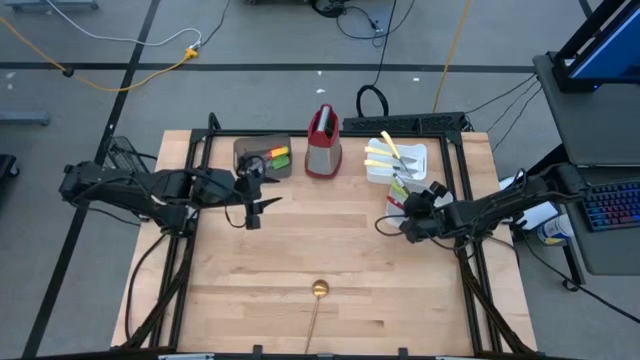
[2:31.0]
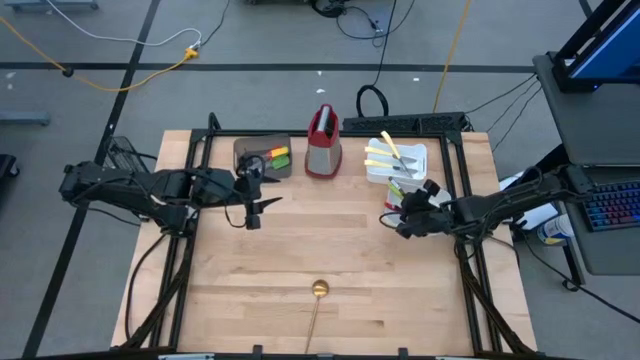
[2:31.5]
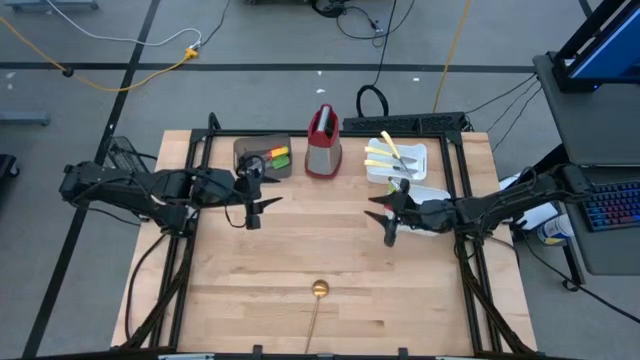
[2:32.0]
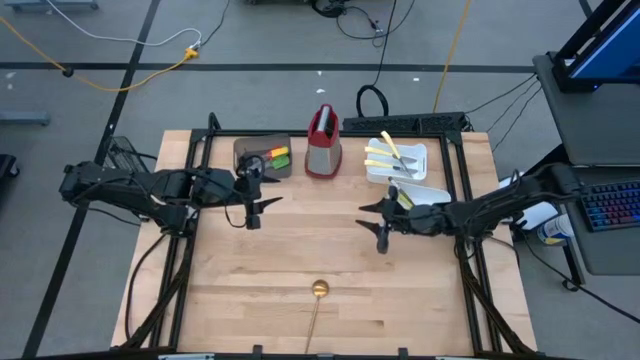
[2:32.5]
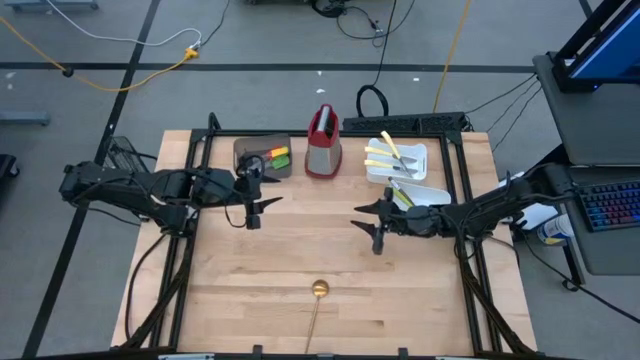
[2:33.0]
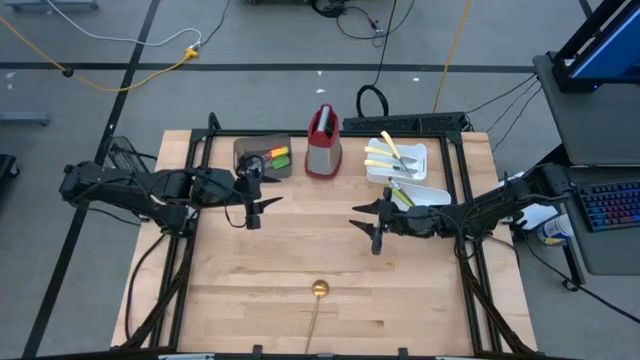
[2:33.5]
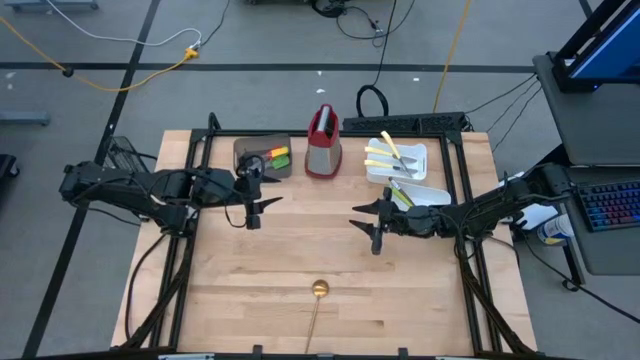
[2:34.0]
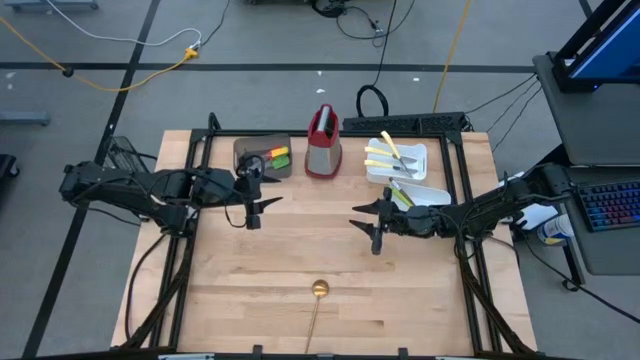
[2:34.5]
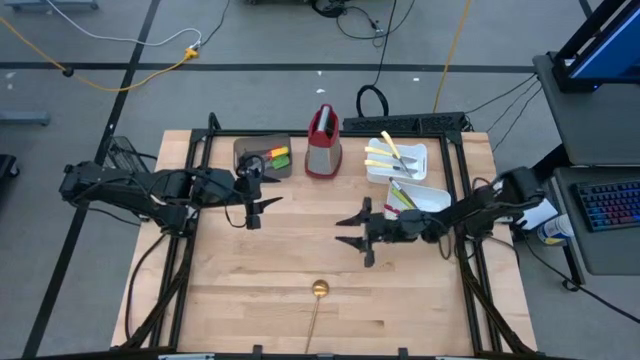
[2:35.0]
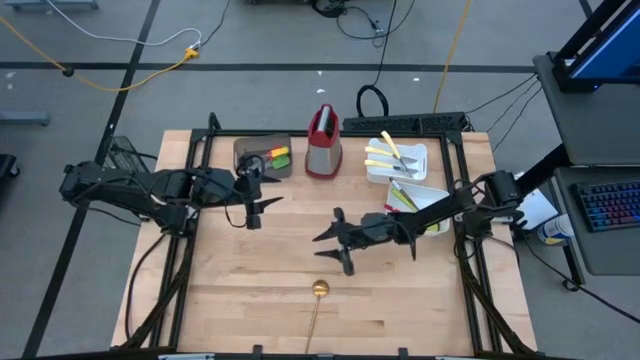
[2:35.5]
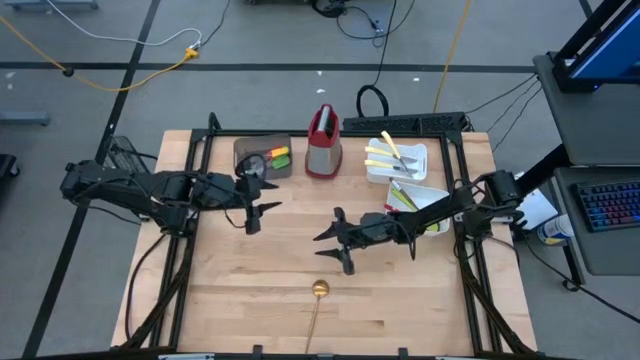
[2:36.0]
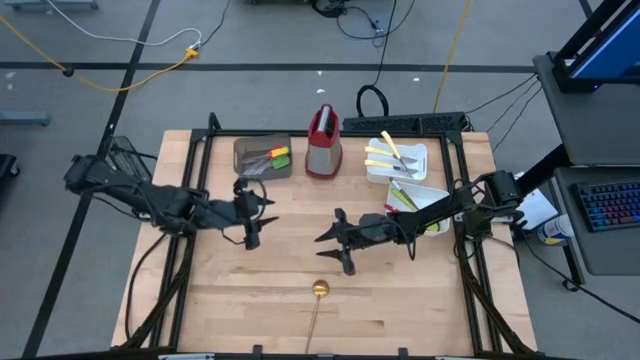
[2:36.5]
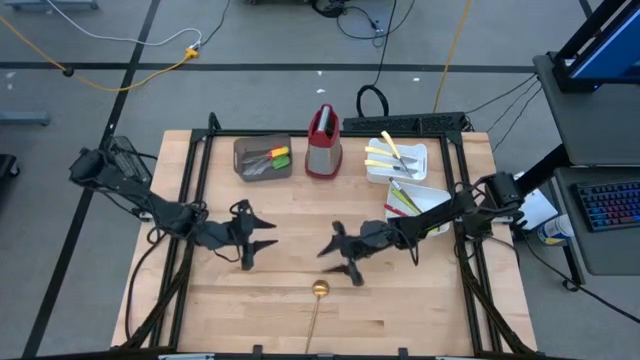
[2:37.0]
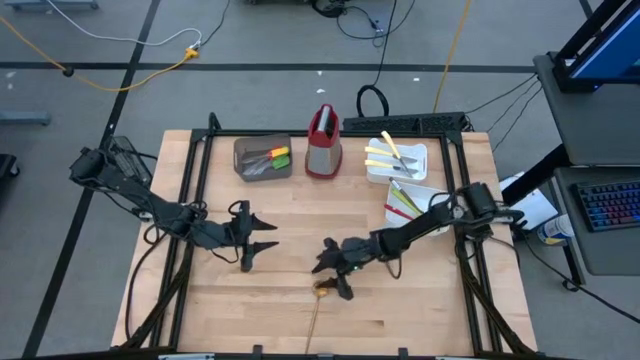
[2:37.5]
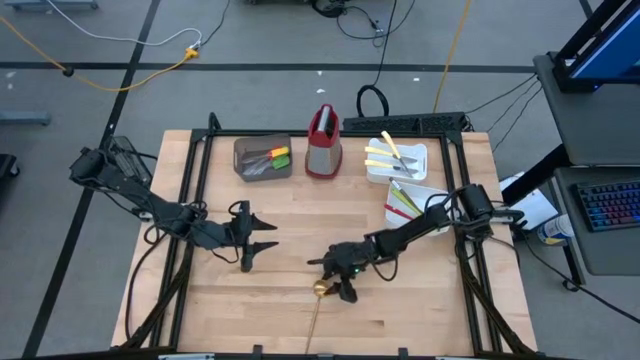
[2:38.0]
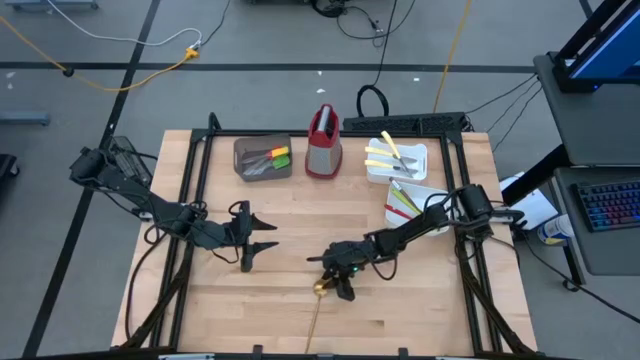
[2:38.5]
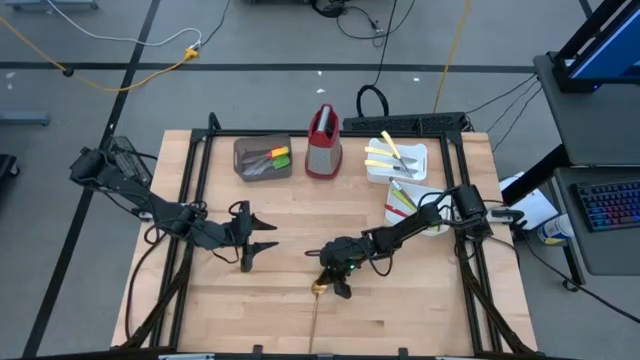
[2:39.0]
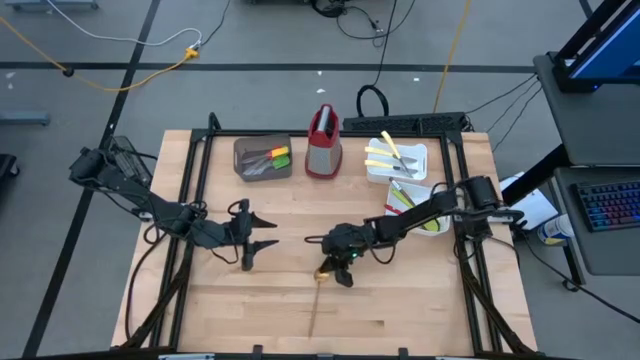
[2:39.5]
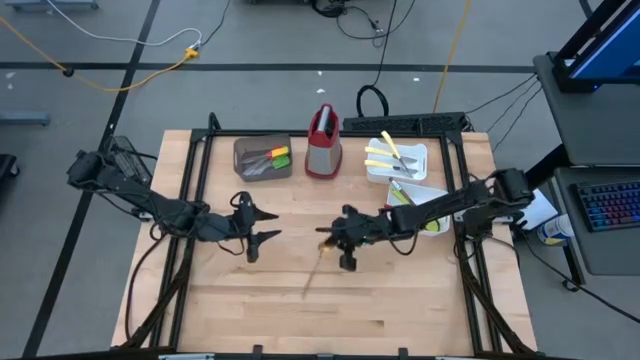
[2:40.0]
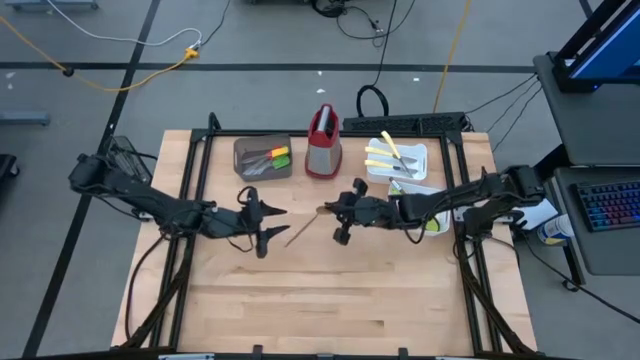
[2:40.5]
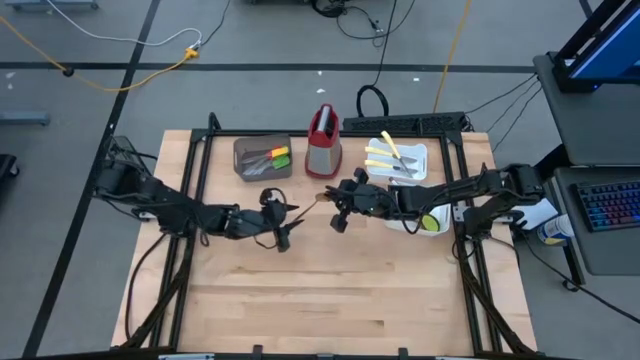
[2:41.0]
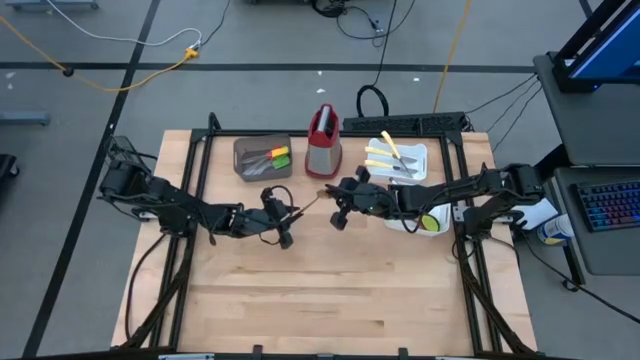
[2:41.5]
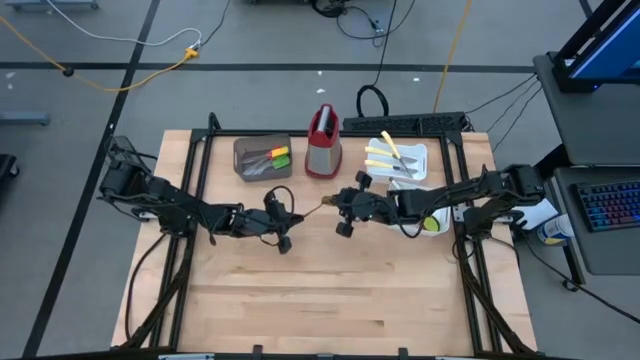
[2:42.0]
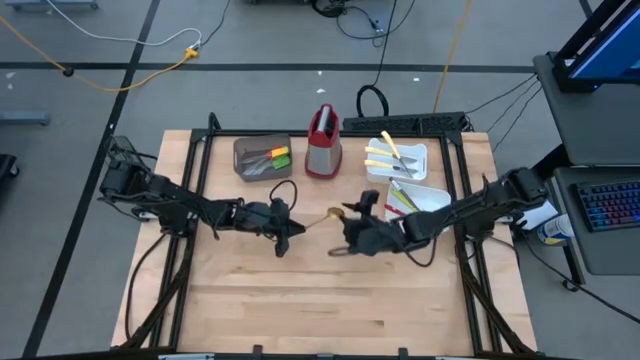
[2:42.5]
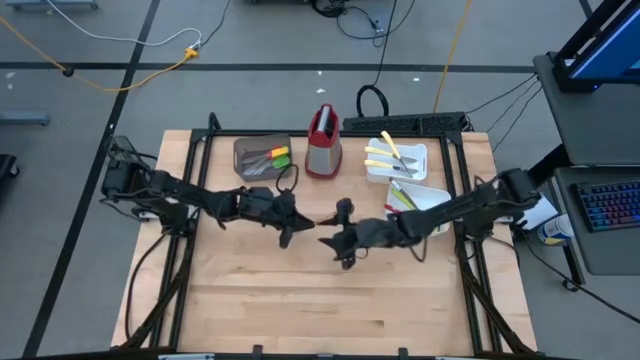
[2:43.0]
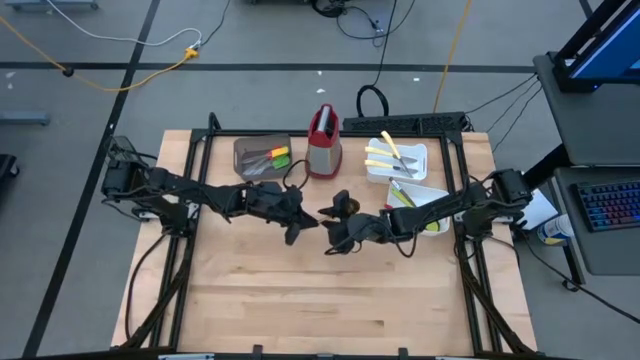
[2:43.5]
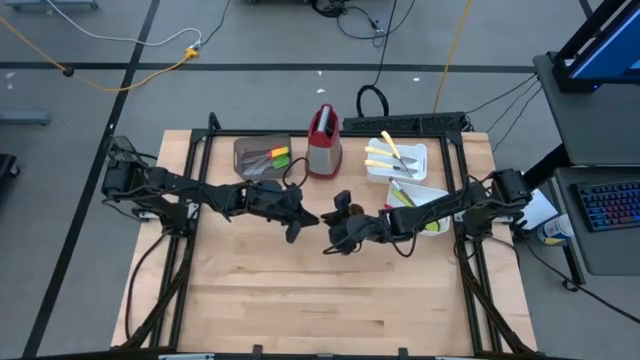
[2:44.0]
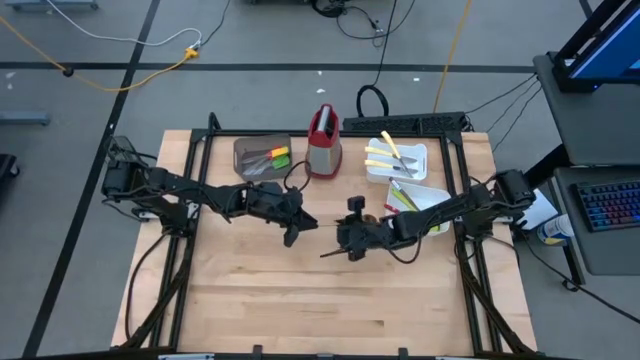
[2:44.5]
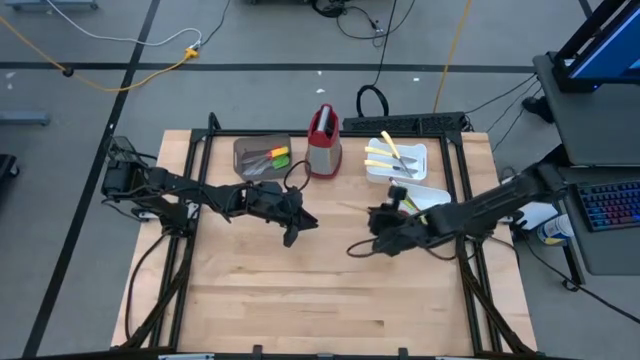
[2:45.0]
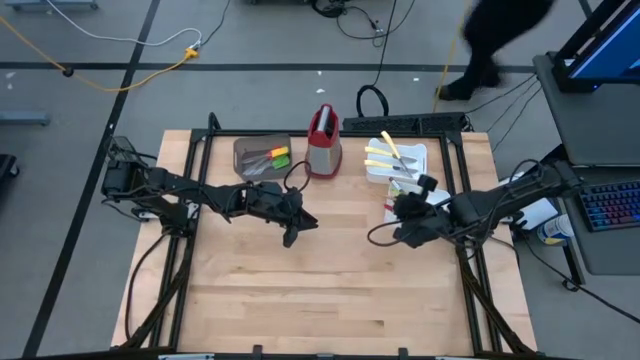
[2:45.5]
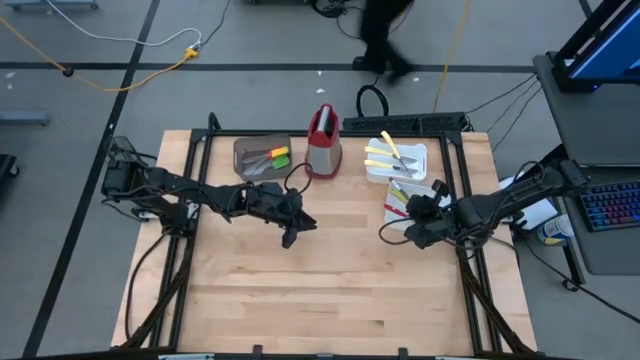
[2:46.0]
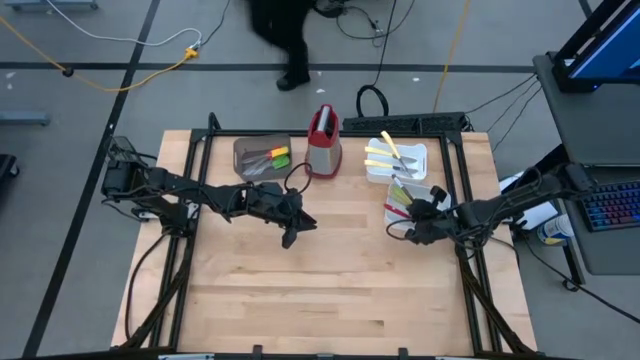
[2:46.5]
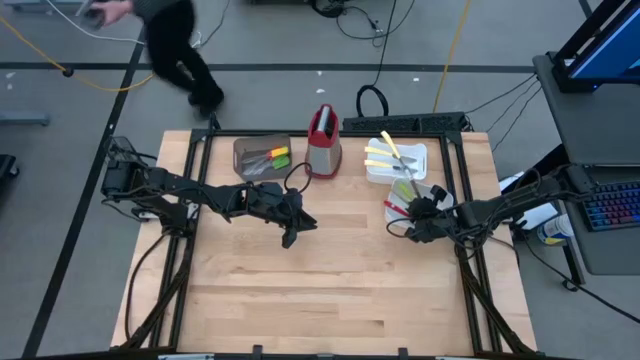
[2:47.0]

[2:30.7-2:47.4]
Task: Pick & Place Kitchen Items
Put the gold serving spoon into the bottom white bin

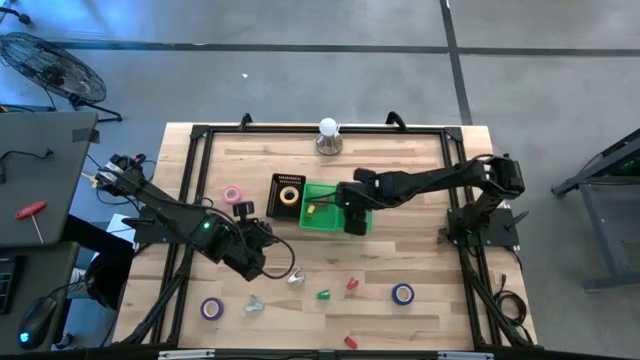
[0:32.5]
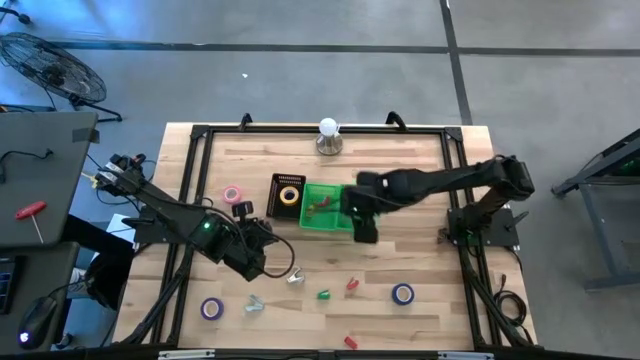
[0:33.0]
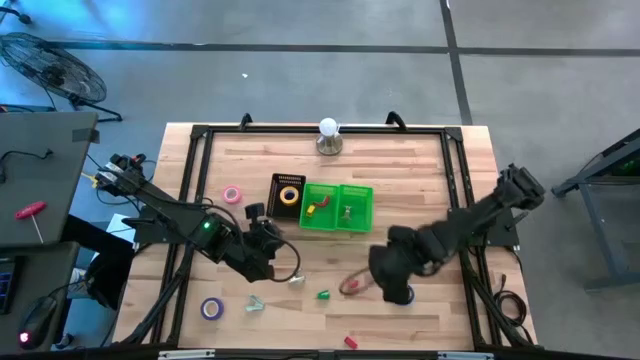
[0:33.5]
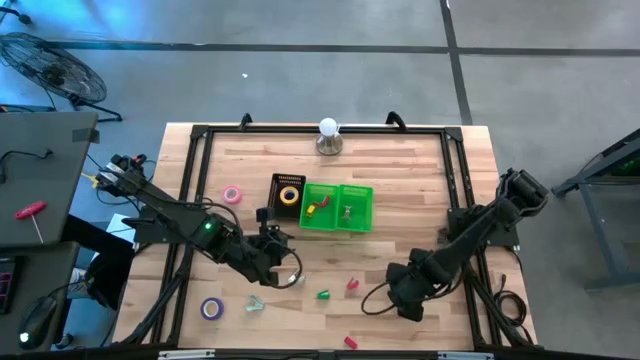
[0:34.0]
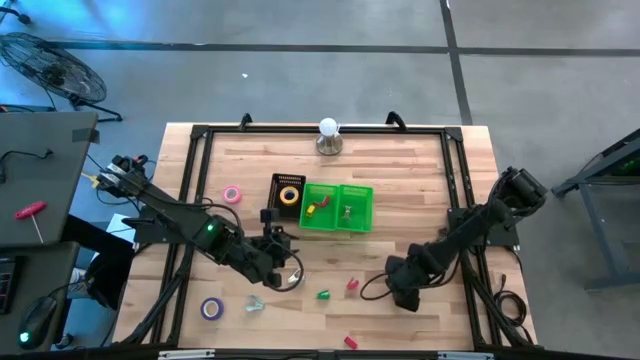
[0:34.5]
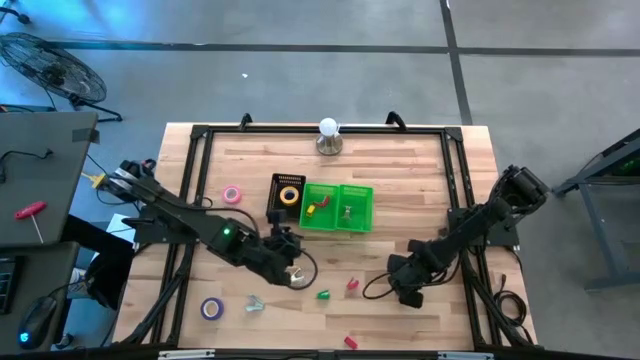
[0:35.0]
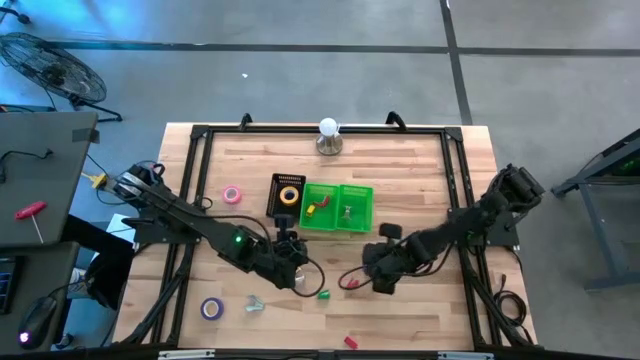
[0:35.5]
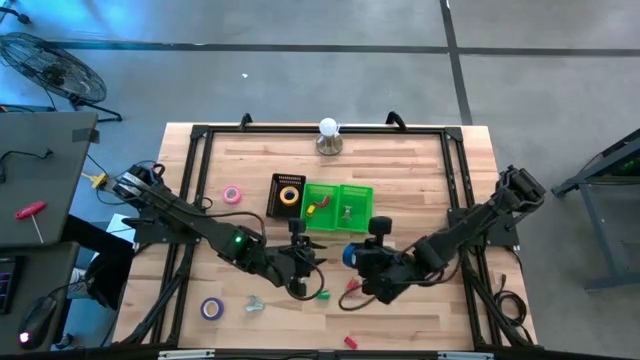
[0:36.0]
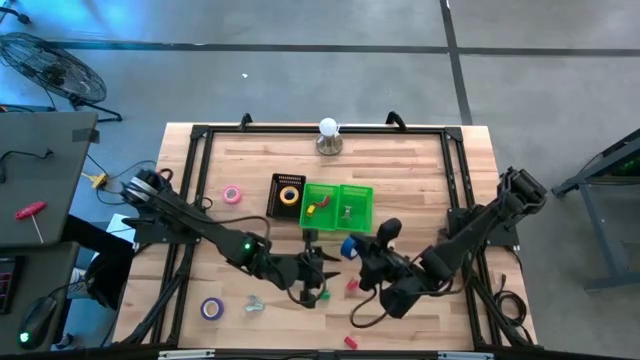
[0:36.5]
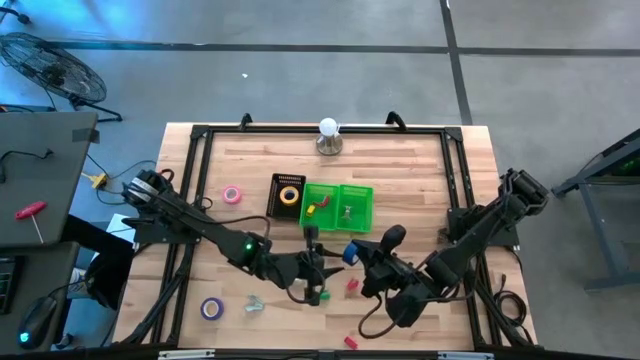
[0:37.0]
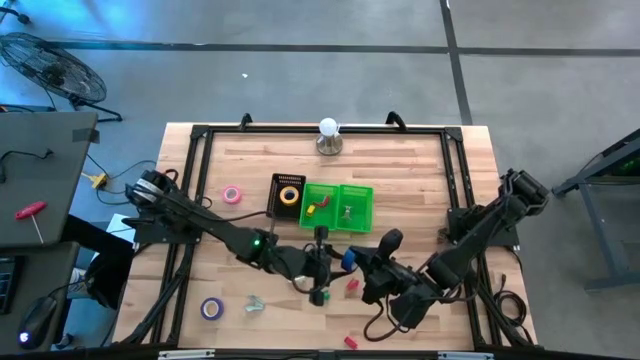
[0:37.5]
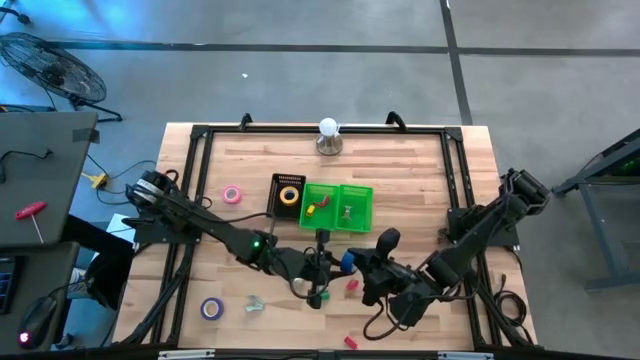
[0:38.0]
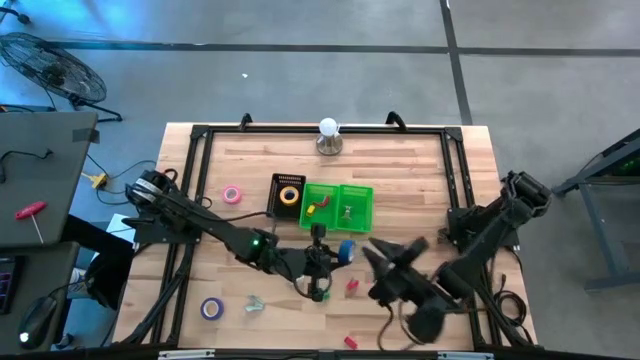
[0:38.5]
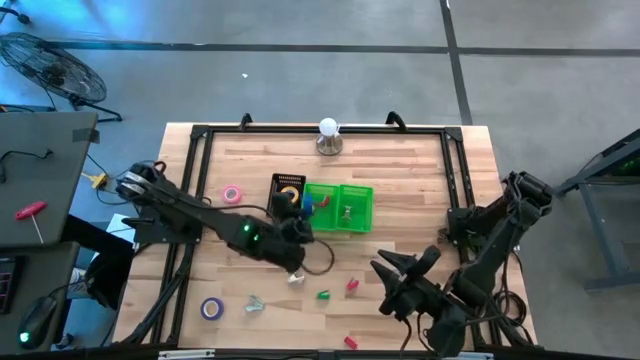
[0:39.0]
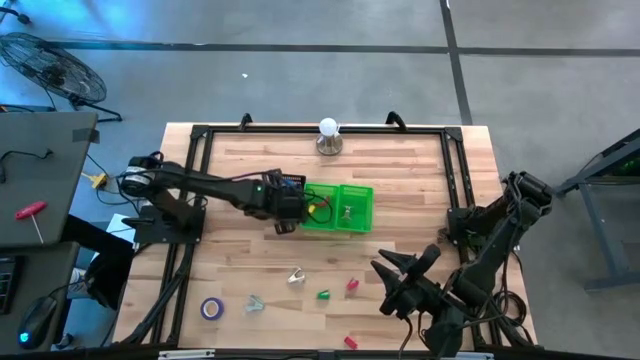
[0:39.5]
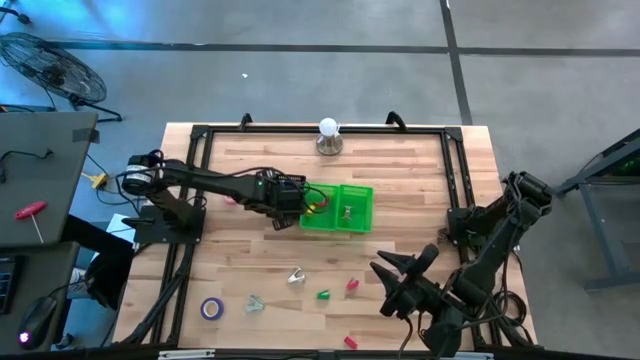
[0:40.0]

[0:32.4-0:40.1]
Task: Pick and place Stapler, Stapler remover, tape
Put the right blue tape into the black bin
